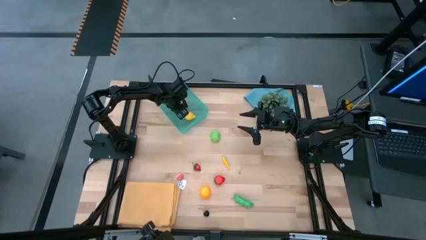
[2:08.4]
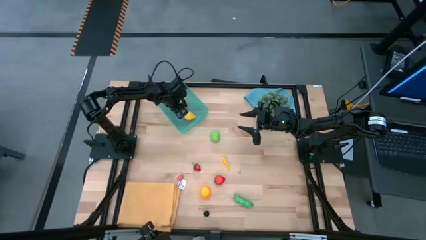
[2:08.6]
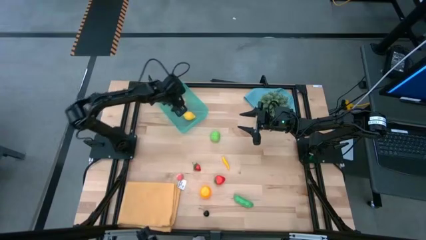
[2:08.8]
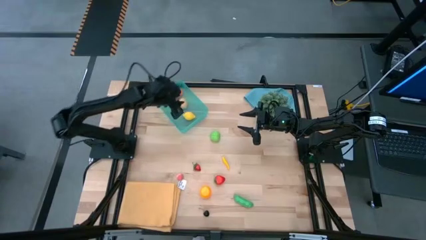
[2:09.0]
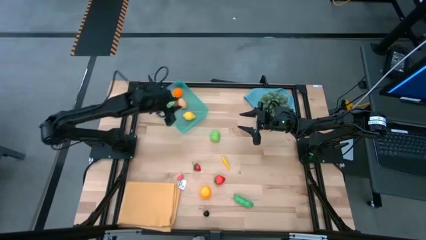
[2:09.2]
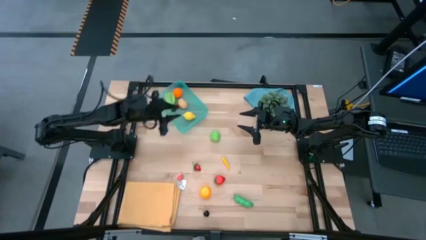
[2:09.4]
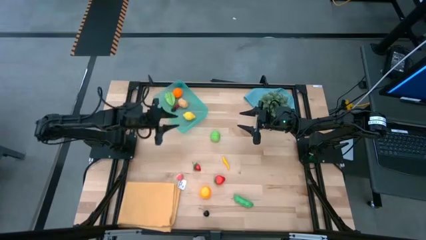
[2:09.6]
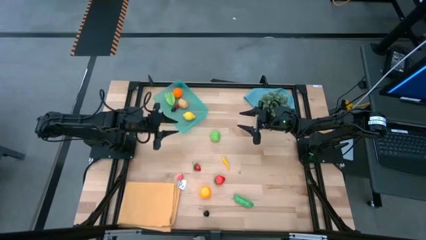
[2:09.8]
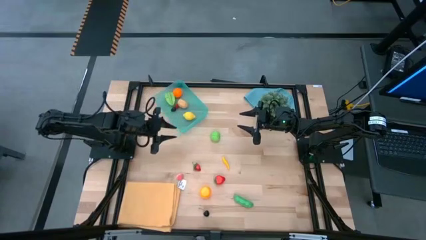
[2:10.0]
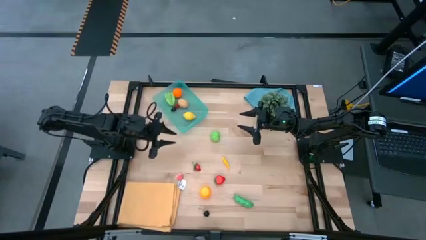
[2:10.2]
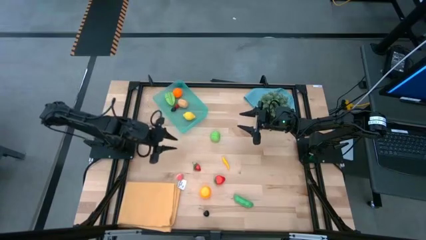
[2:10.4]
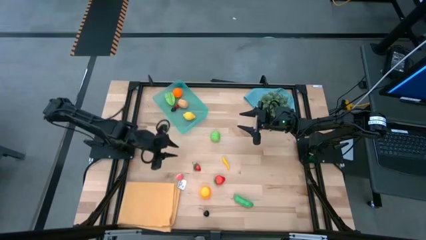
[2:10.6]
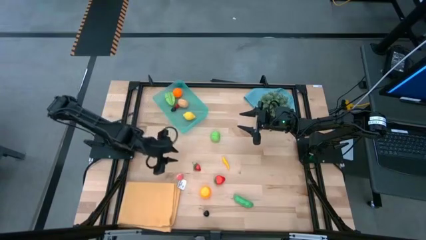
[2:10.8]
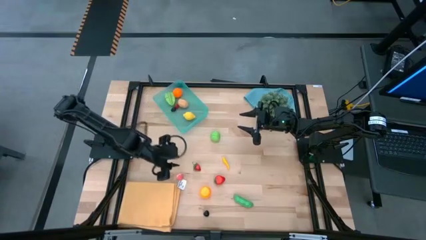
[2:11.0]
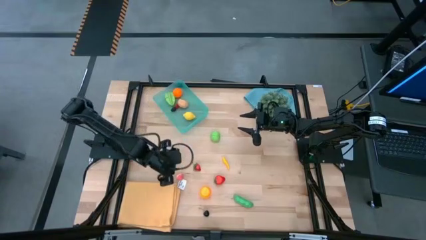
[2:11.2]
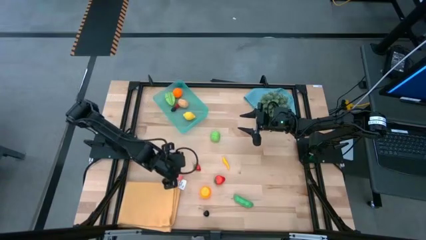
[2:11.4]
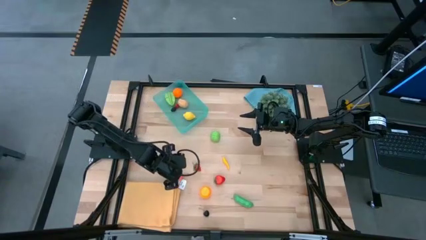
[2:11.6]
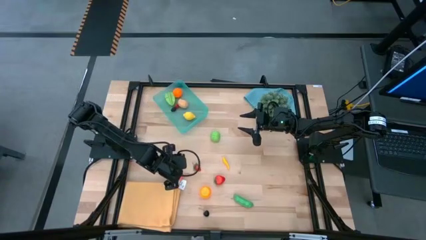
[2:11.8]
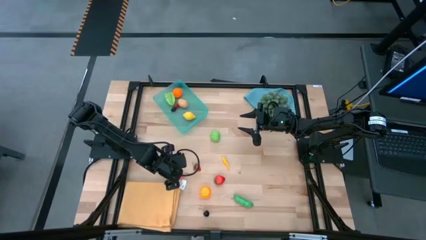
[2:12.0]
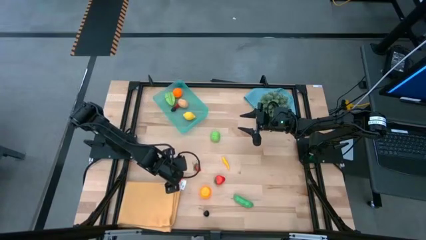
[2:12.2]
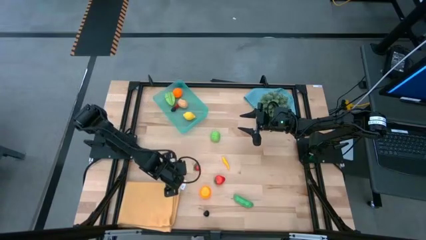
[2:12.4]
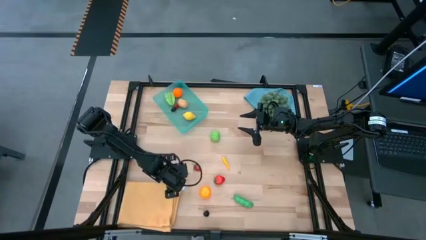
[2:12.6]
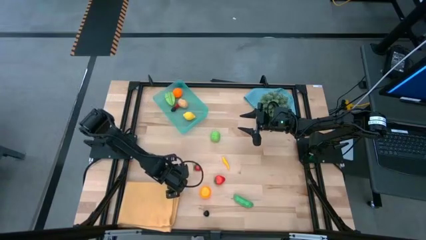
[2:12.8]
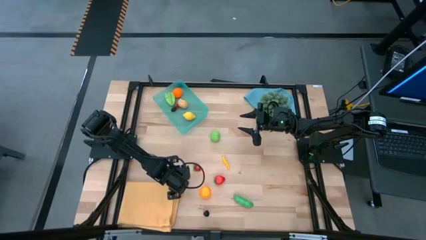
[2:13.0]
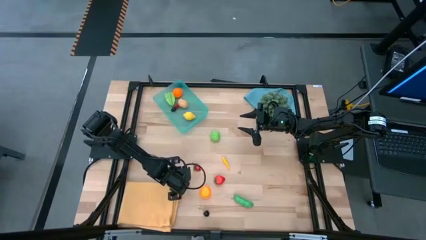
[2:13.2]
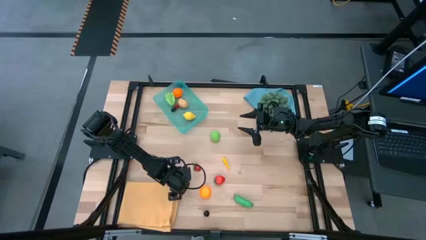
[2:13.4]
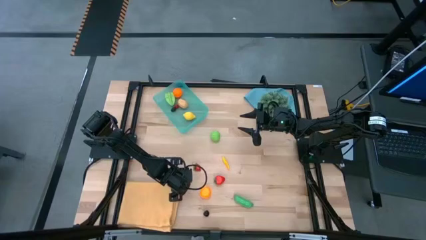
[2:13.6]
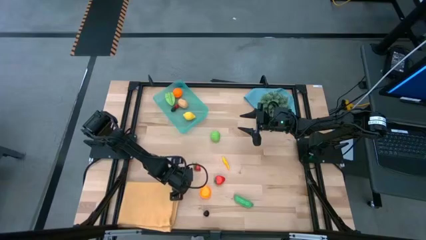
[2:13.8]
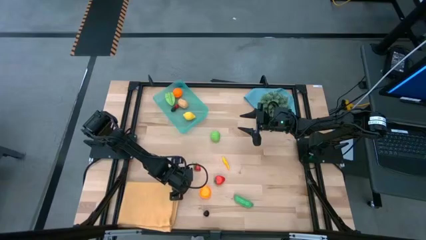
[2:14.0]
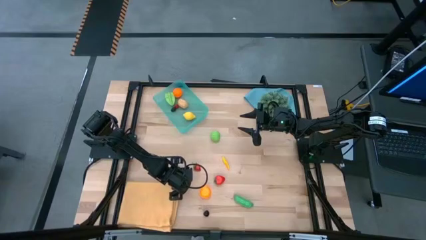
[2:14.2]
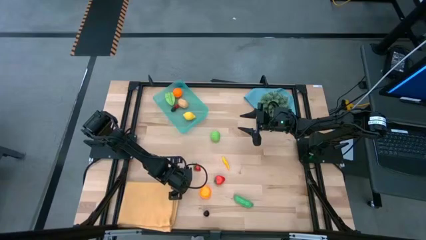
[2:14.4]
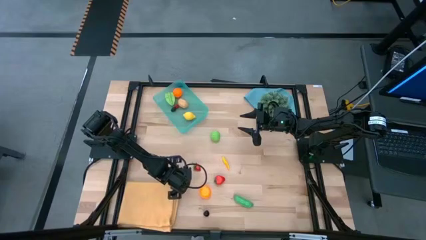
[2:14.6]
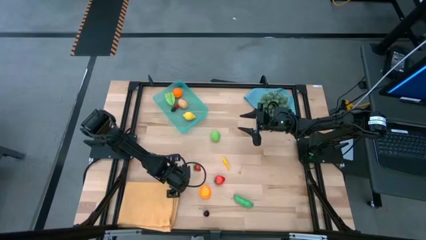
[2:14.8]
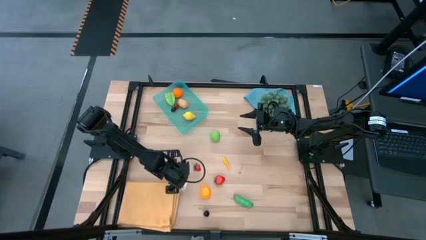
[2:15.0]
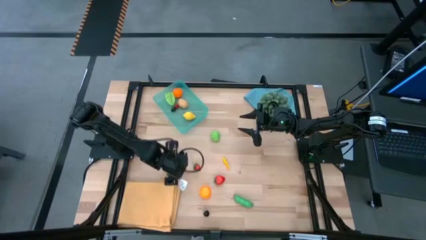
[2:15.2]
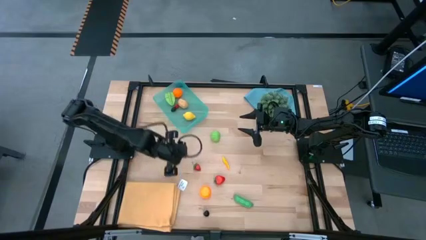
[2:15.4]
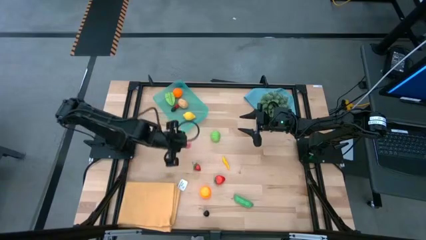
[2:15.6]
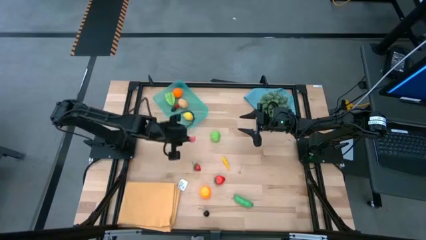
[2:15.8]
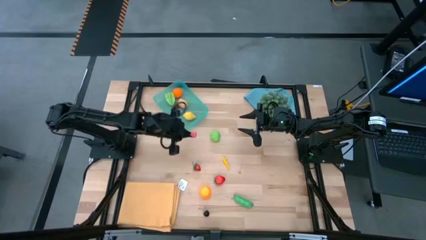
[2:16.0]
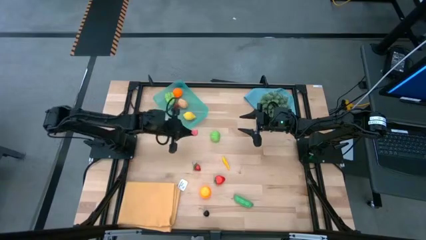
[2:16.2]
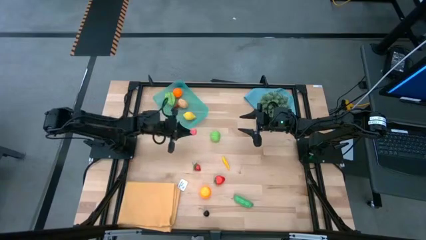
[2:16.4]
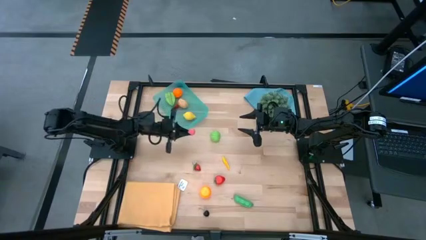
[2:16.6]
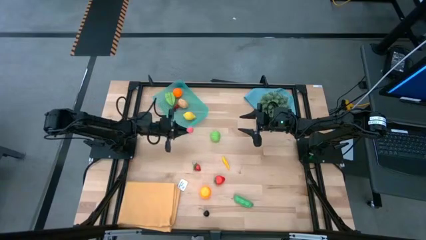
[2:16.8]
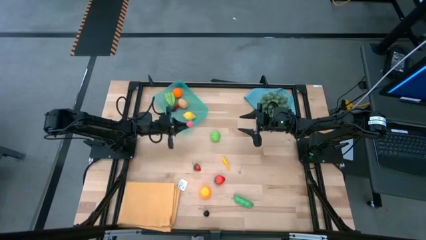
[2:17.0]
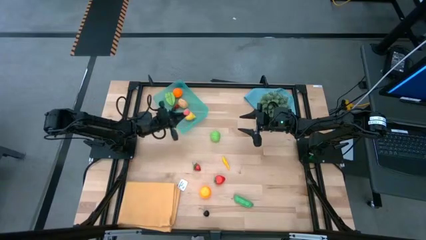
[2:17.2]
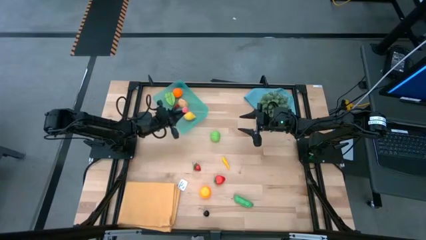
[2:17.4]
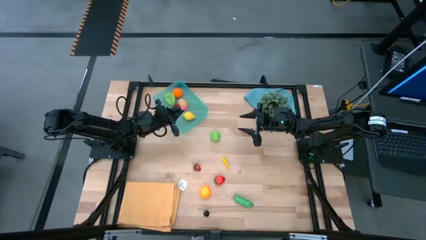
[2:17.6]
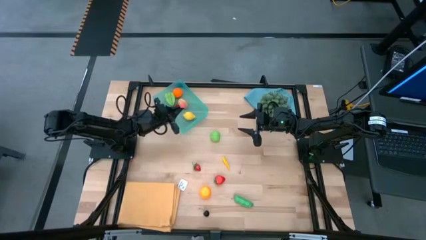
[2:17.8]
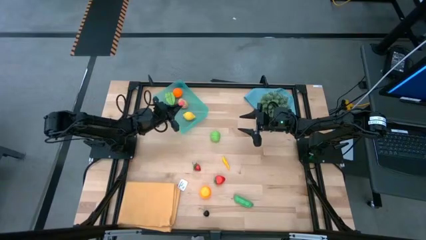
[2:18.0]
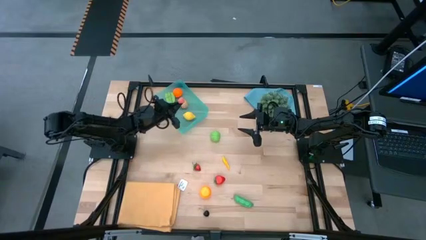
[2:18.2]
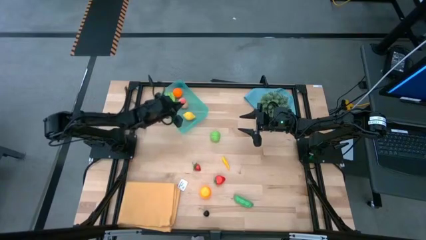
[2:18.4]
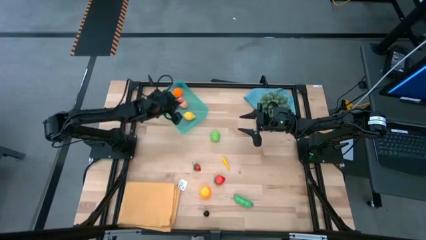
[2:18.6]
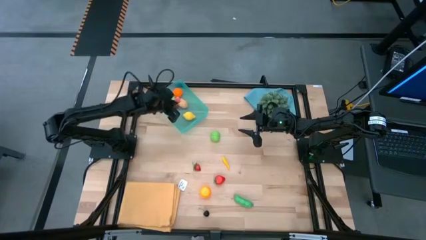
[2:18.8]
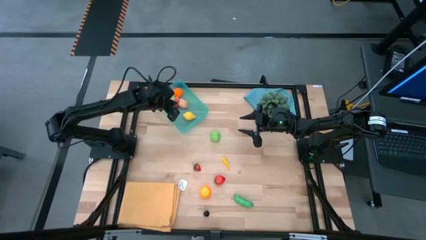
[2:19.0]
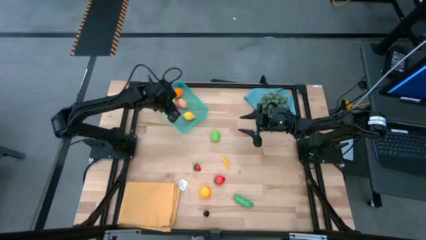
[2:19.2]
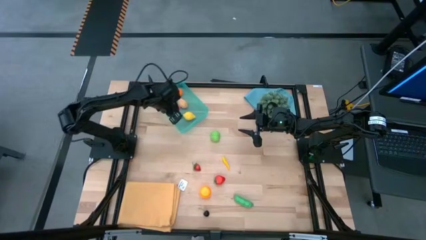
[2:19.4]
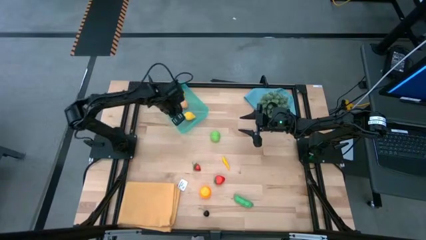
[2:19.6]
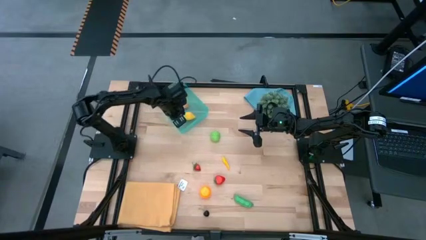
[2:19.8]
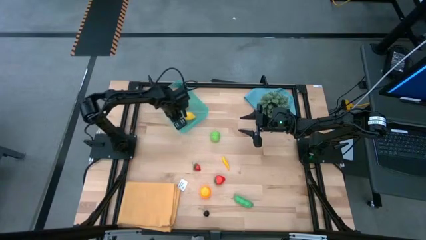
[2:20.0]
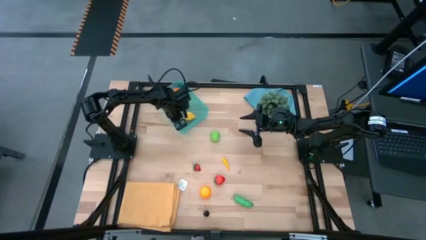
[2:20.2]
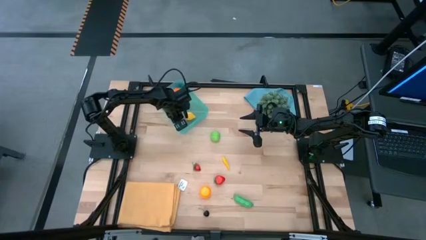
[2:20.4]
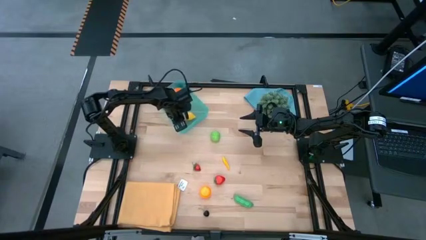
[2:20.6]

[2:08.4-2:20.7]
Task: Pick and placing Produce into tupperware
Put the pink peach into the blue bin

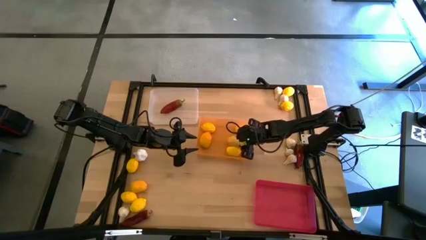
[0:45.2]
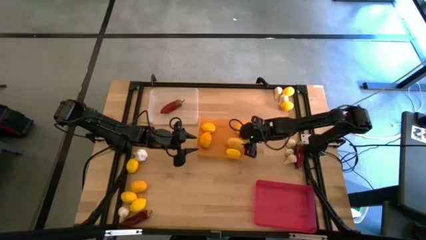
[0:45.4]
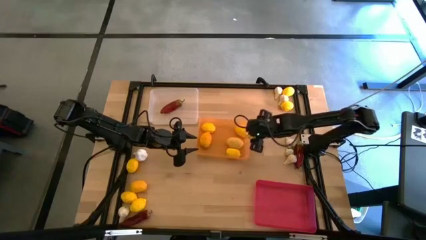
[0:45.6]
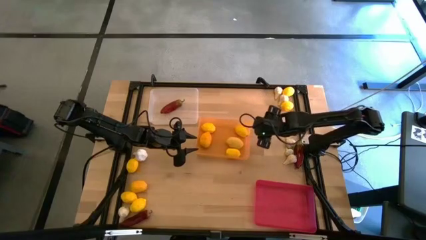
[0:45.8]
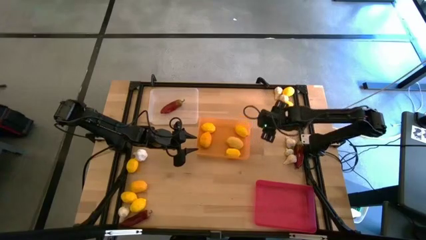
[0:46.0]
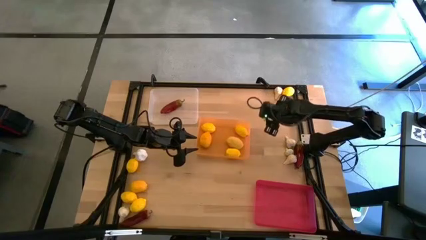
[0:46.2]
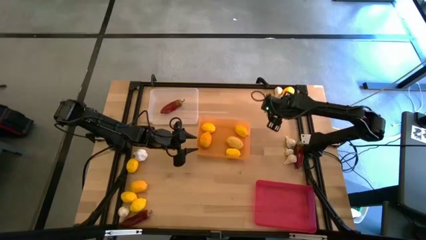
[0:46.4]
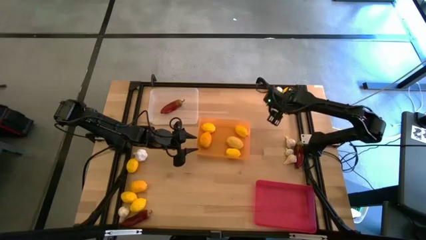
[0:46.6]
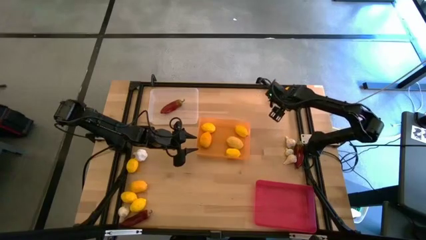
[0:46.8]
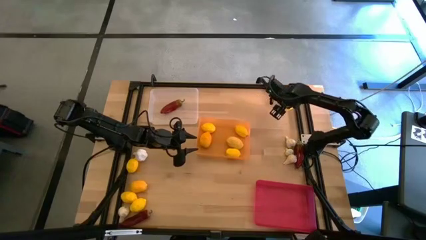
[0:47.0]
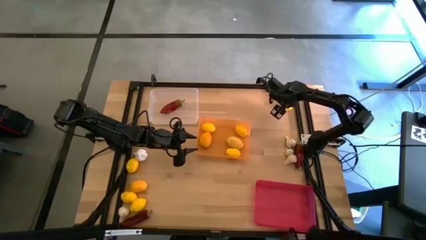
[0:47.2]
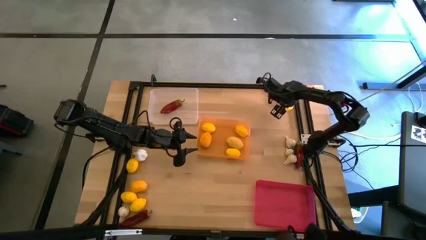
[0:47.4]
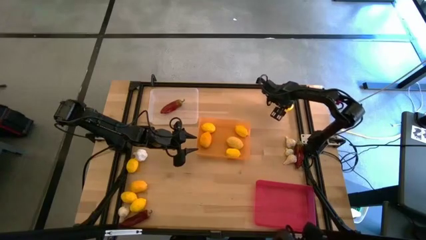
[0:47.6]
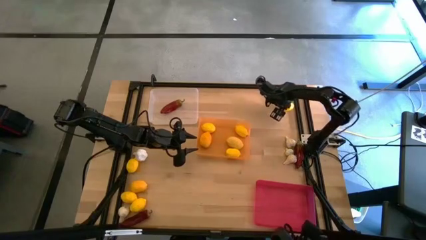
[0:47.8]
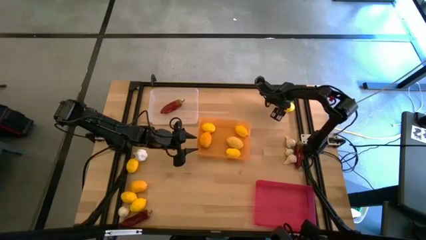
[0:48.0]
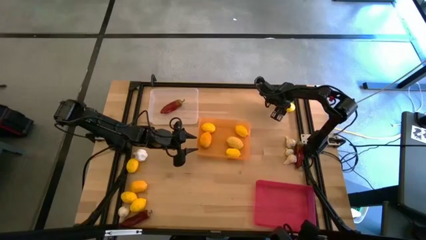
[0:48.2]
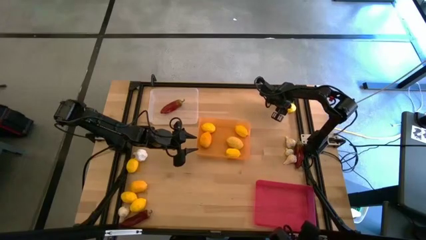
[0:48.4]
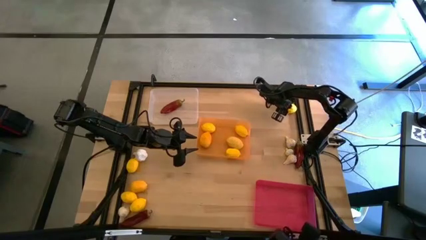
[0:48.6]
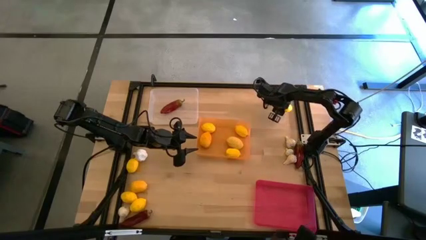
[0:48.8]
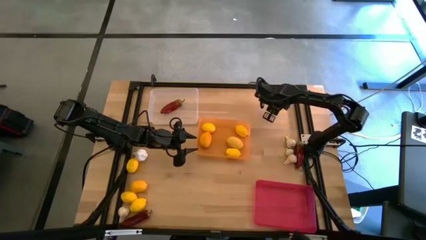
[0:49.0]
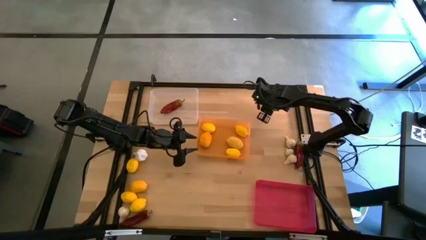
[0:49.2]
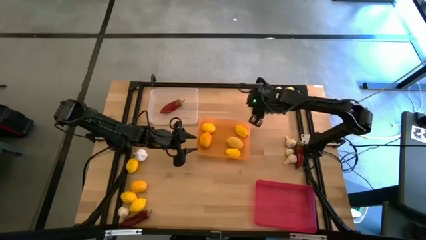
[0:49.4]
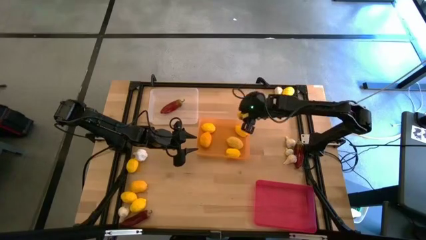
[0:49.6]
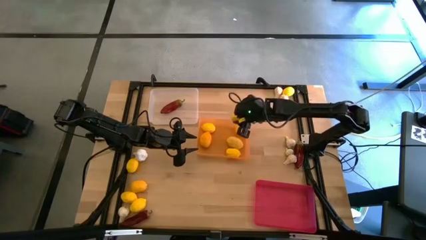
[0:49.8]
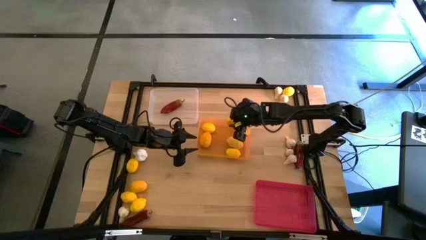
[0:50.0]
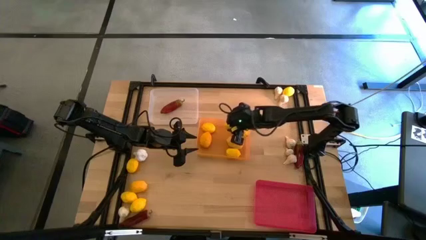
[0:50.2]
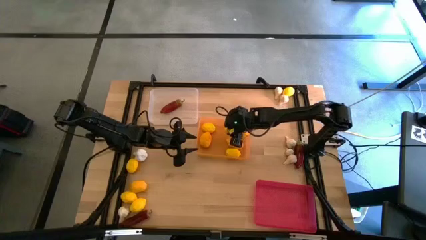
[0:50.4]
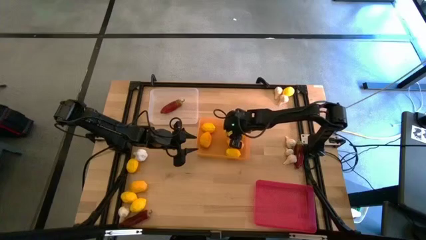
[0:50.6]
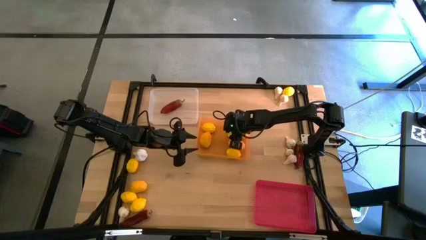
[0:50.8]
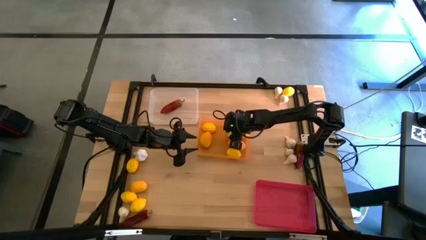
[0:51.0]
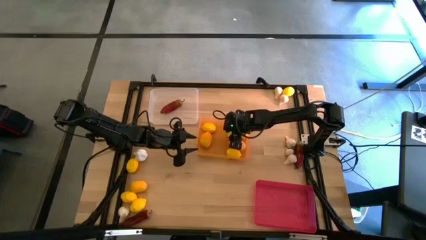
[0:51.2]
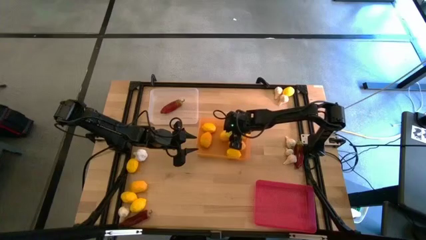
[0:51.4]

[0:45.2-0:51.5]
Task: Sort produce into baskets
Put the lemon into the orange bin
